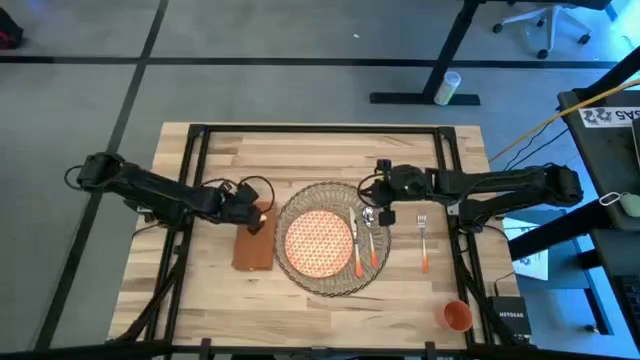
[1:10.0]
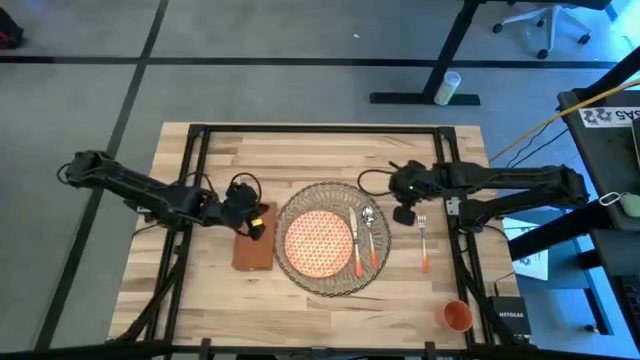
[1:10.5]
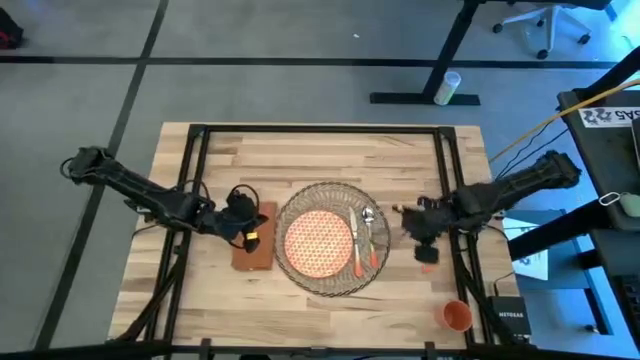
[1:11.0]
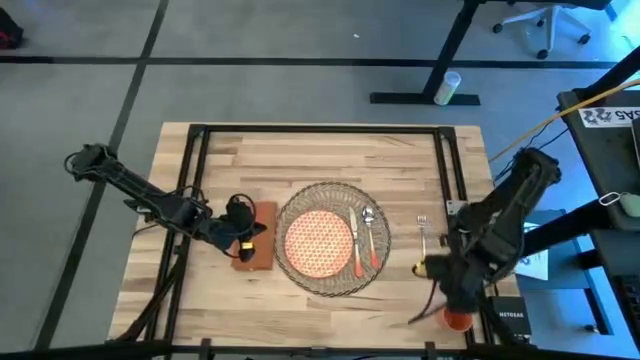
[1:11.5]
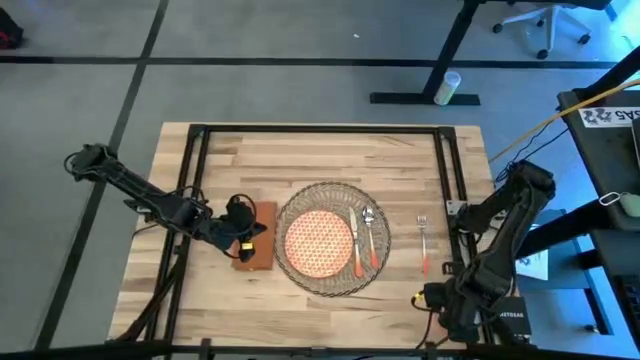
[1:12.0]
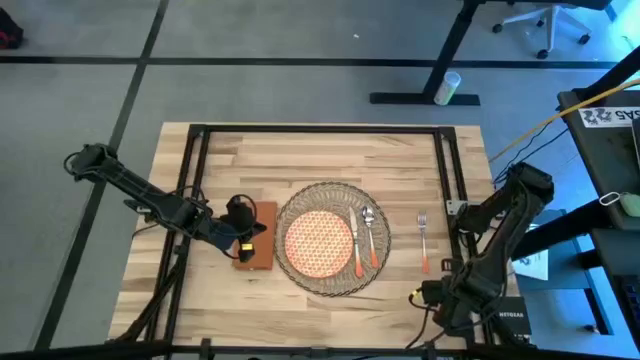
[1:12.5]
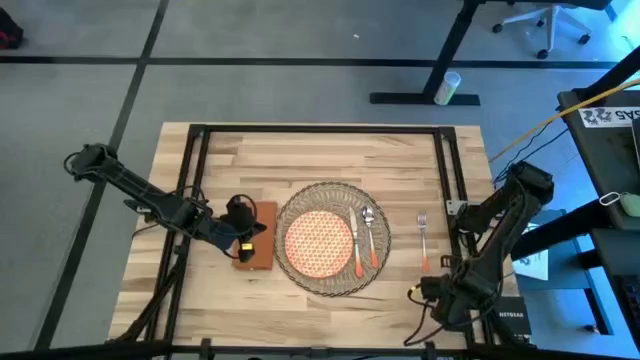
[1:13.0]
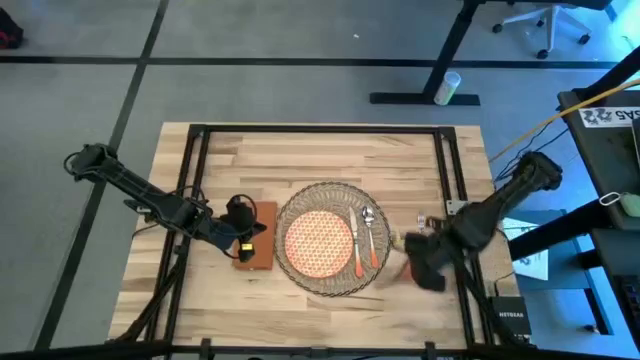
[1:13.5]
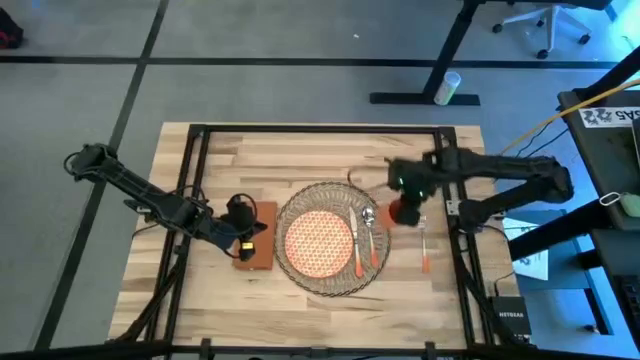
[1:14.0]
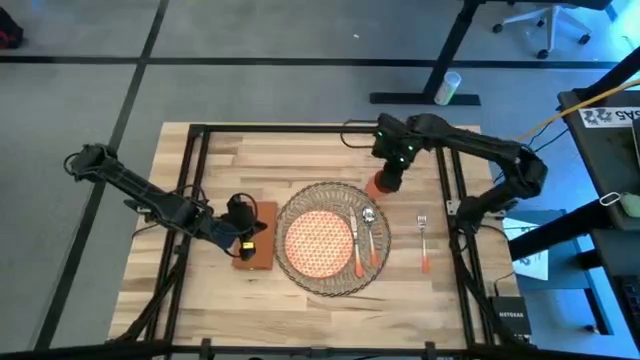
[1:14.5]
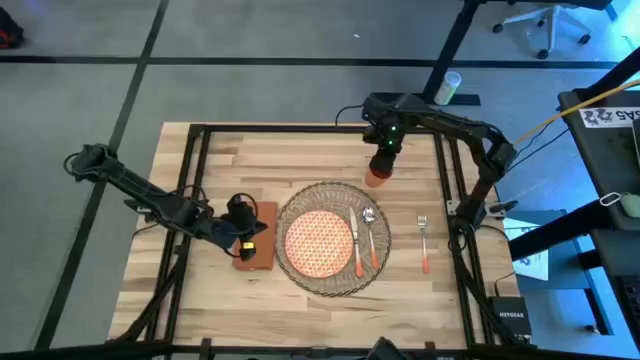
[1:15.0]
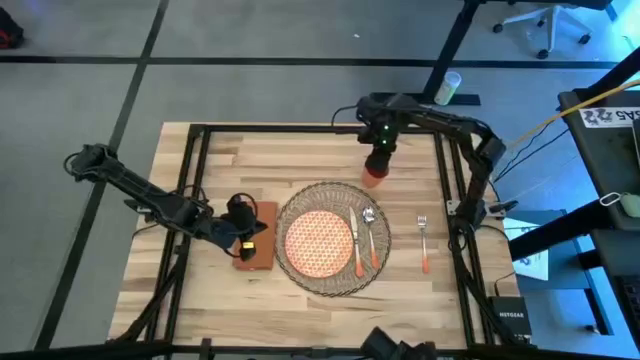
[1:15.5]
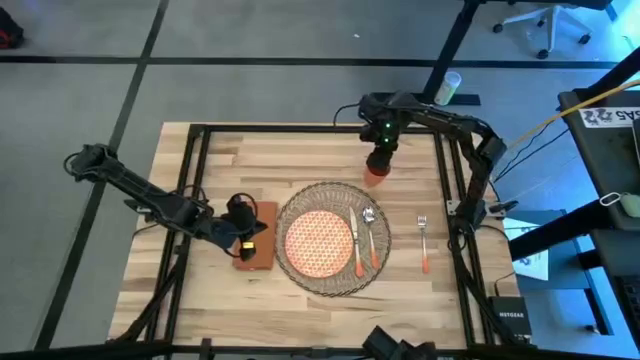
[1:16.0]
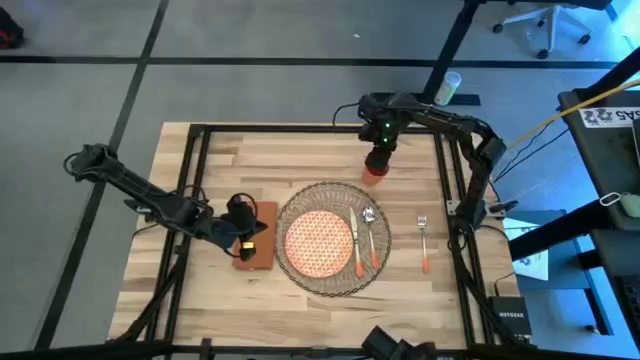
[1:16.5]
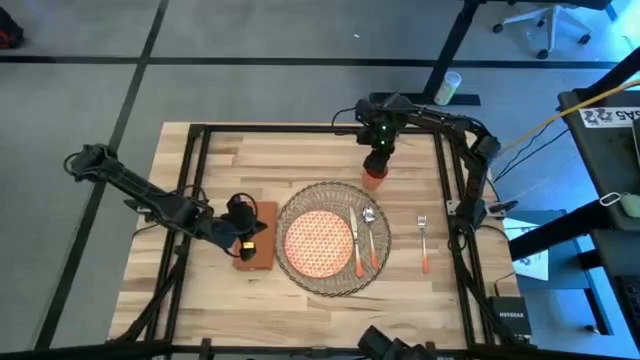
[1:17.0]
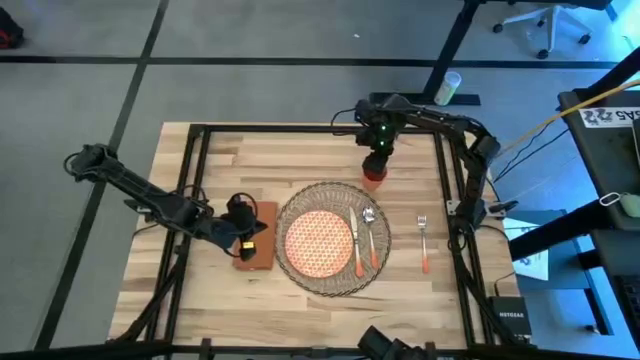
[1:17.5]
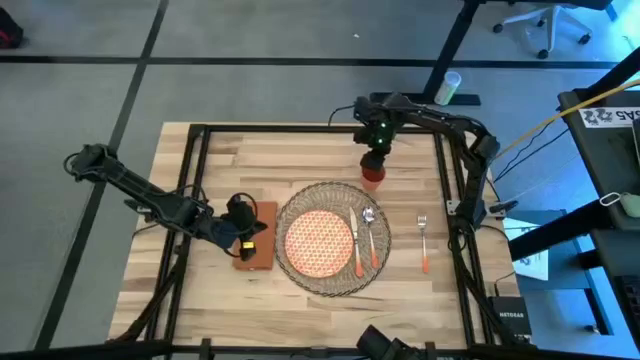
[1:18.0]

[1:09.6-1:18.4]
Task: Set table place
Put the orange cup to the top right of the brown woven placemat

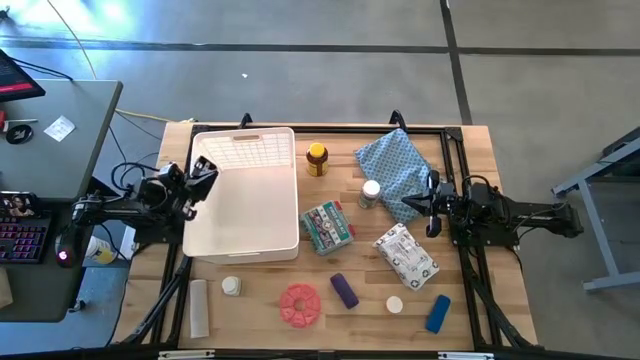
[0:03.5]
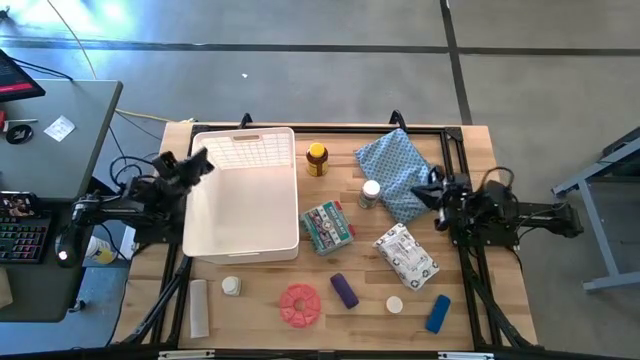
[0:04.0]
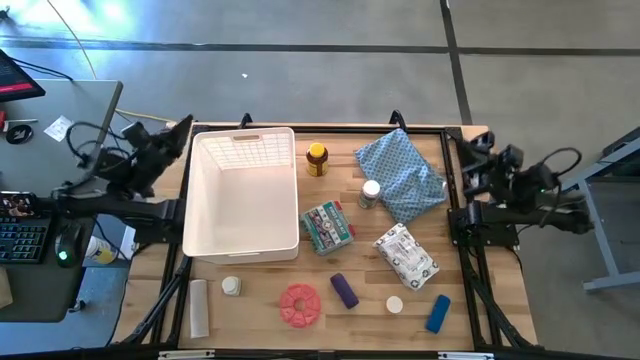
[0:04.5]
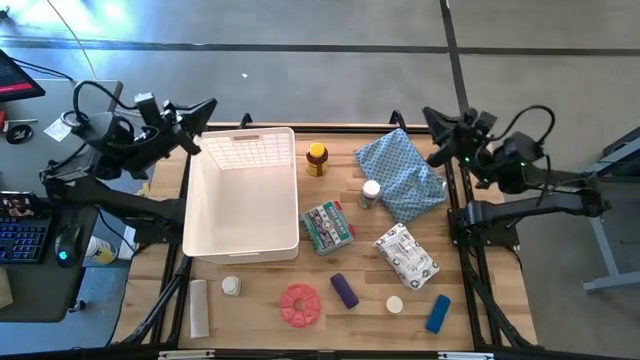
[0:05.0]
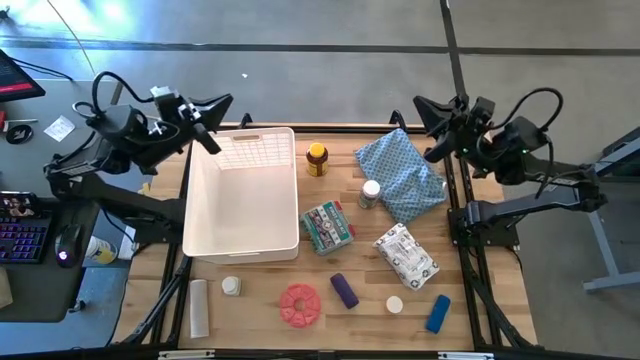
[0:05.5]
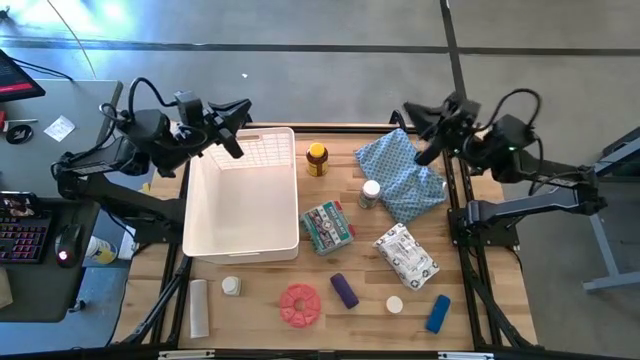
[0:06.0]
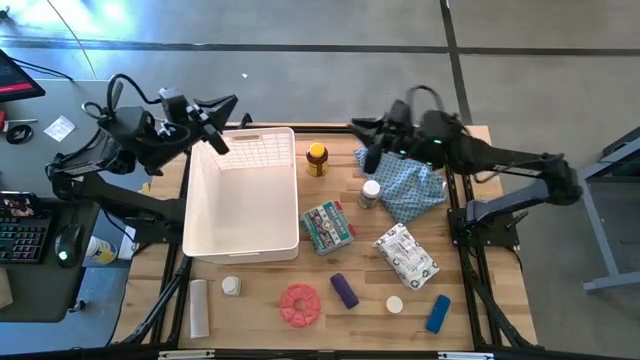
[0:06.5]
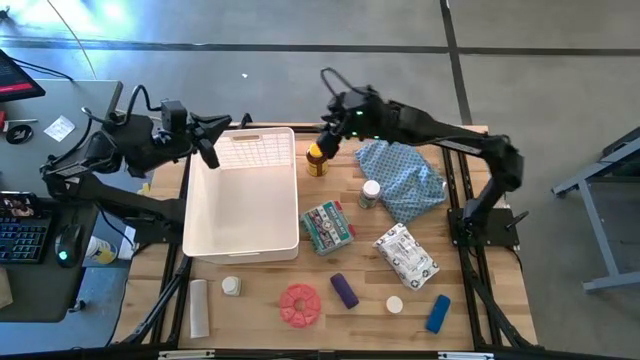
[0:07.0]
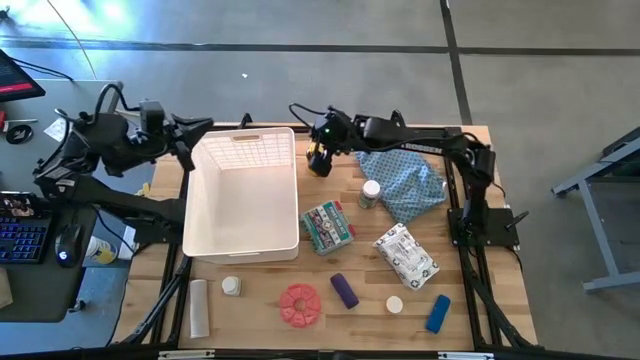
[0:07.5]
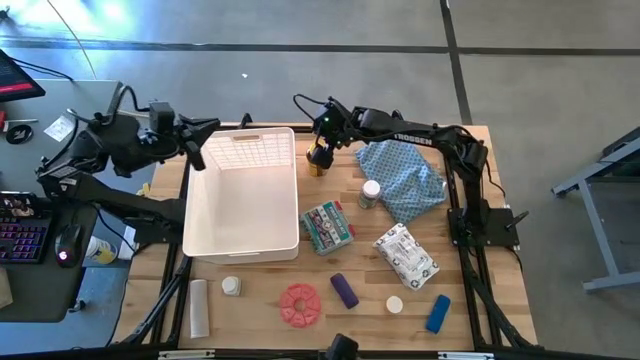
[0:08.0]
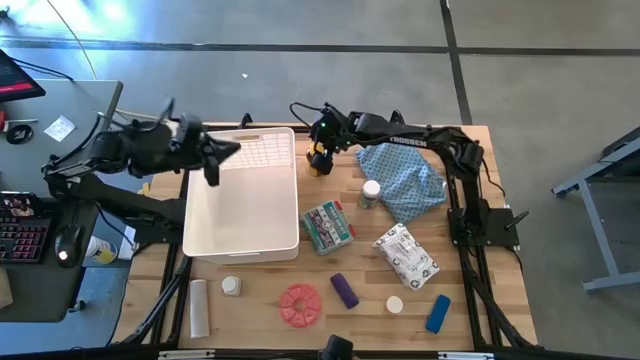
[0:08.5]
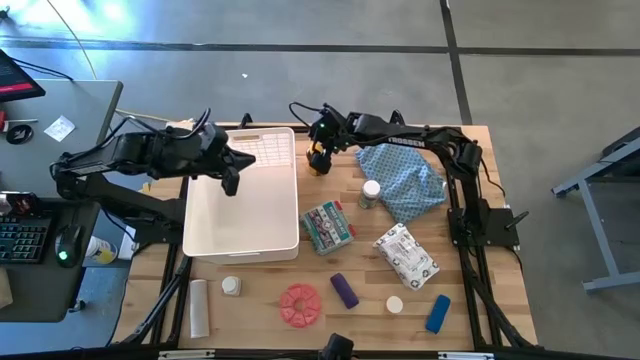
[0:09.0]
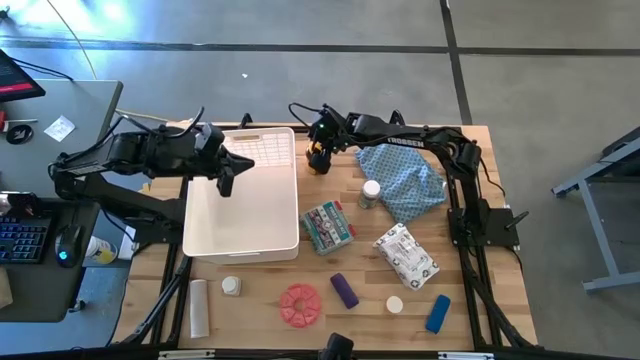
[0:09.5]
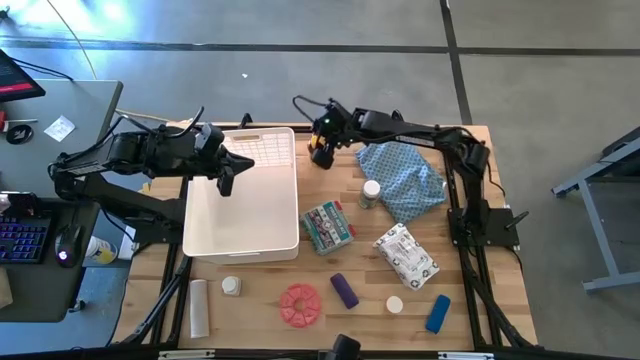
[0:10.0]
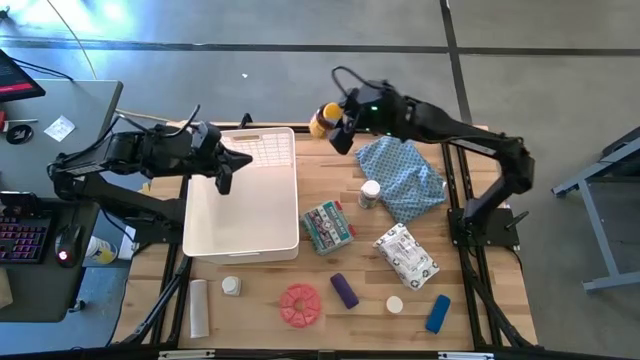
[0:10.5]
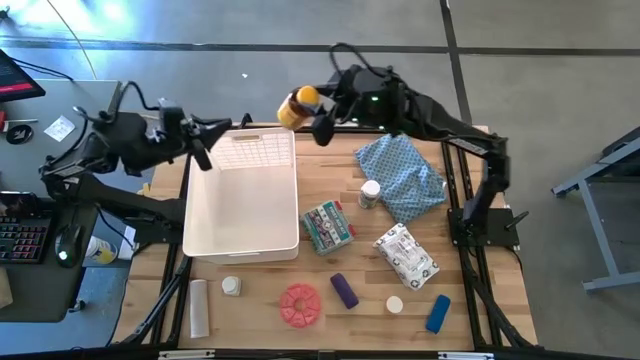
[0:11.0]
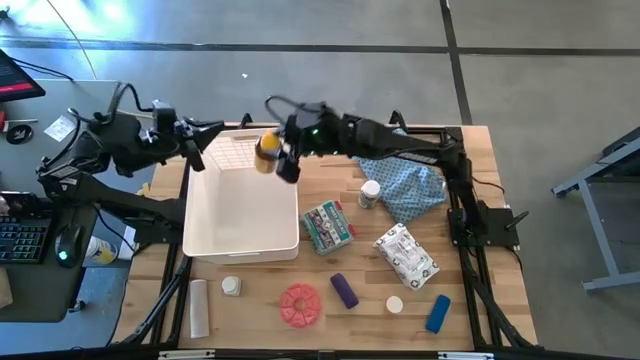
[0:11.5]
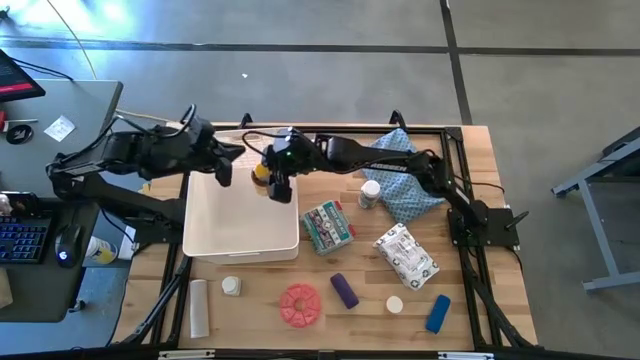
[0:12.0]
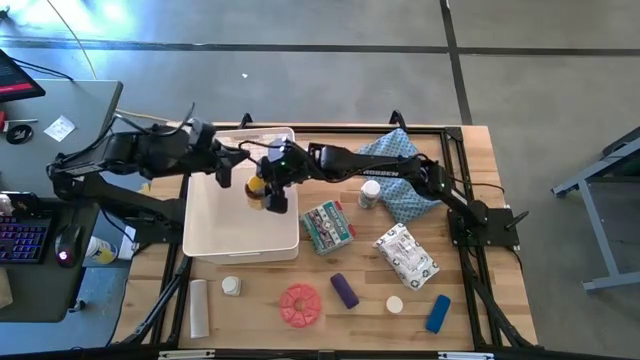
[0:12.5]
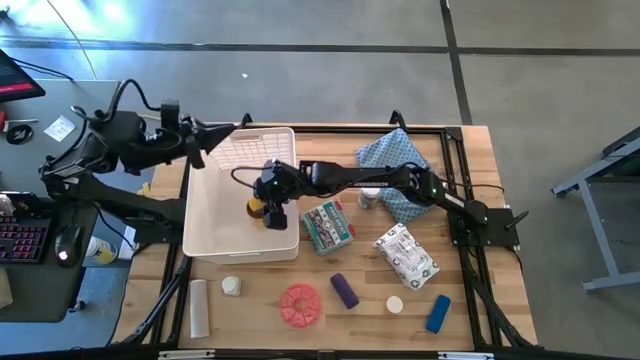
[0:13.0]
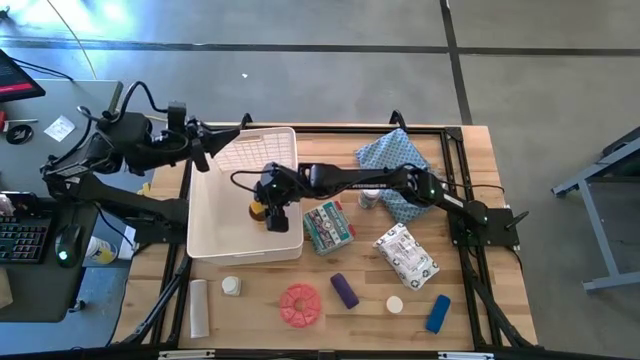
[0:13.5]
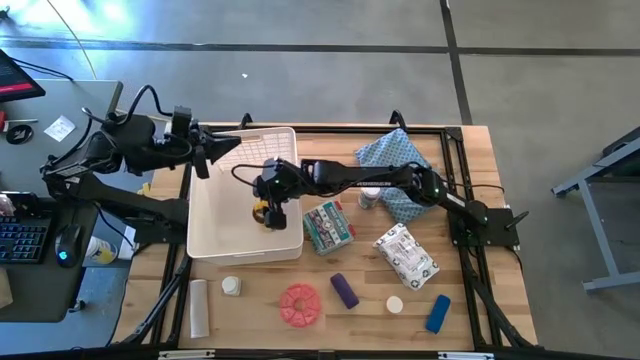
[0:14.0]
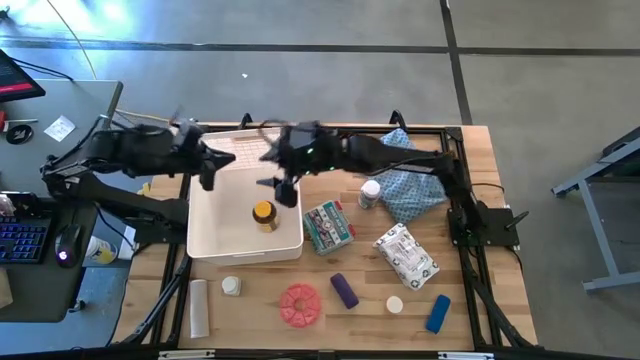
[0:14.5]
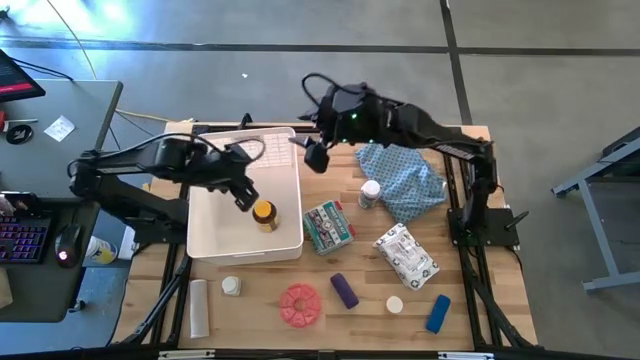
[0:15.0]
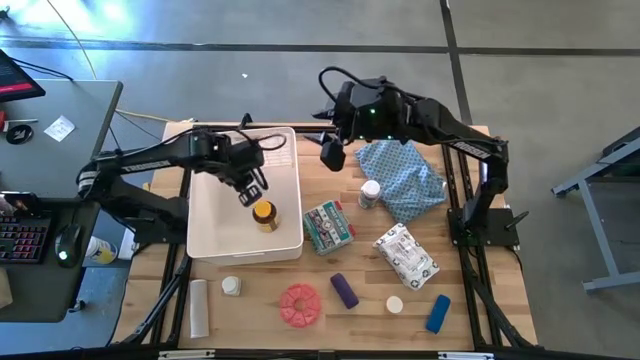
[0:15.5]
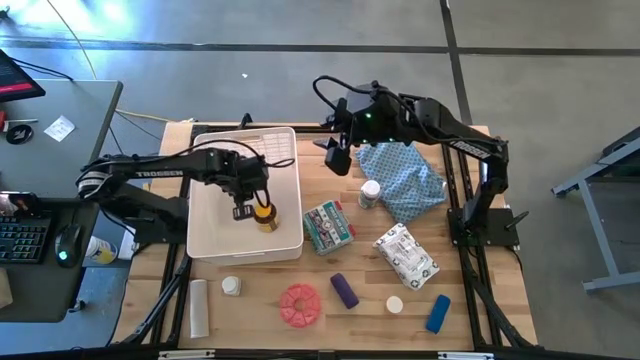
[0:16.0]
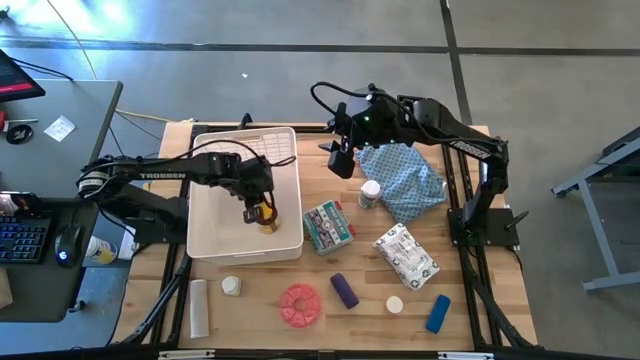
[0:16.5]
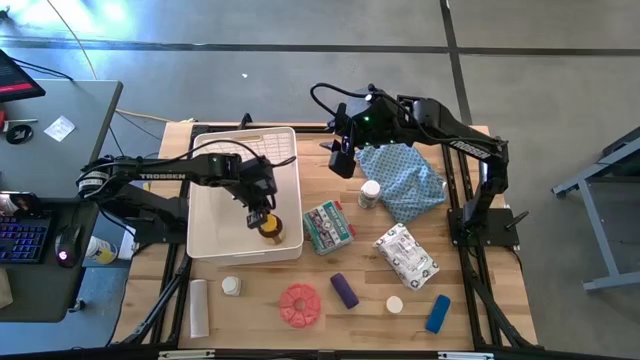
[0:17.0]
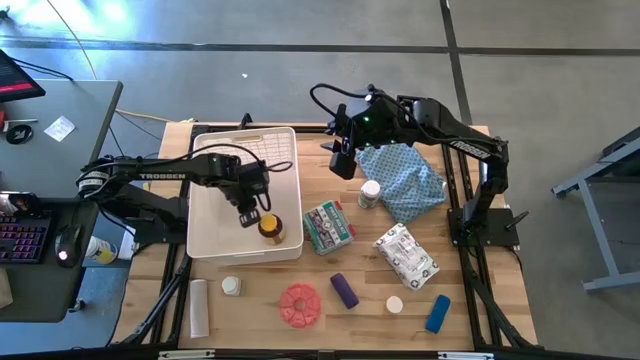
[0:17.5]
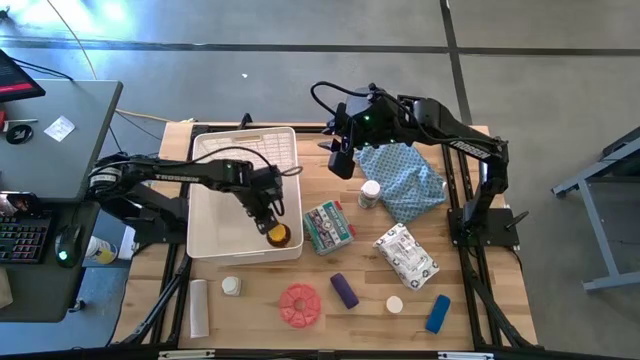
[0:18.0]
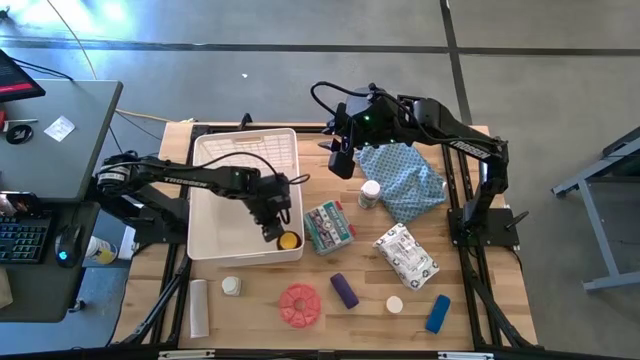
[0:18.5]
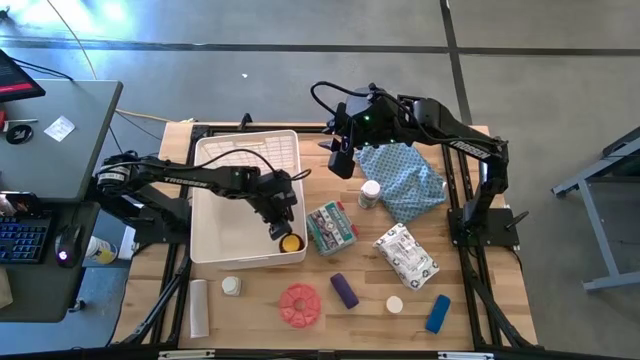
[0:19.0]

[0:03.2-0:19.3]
Task: Pick & place medical supplies in basket/bin
Put the yellow medicine bottle into the white bin
